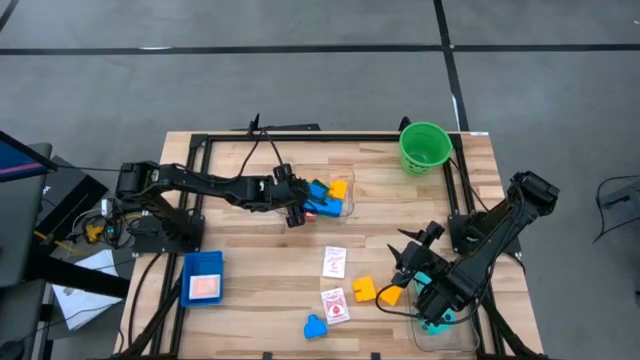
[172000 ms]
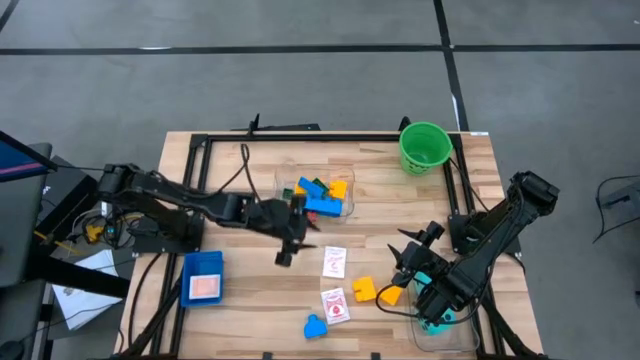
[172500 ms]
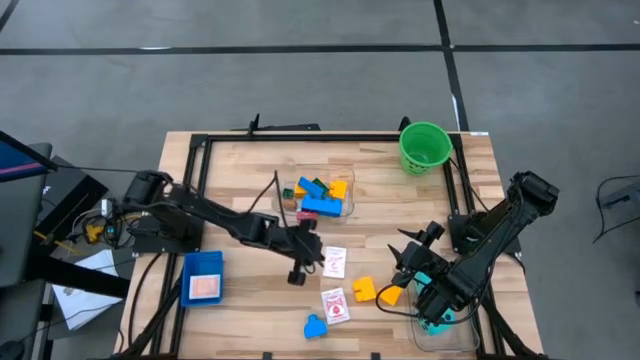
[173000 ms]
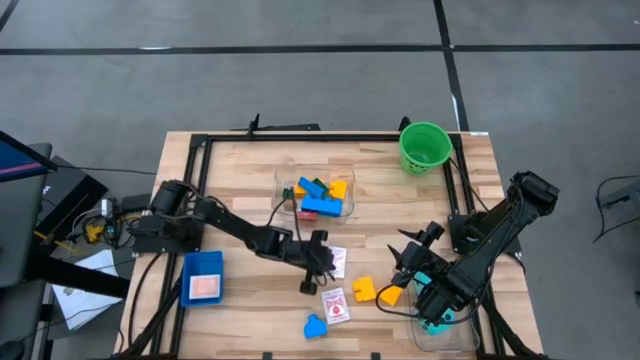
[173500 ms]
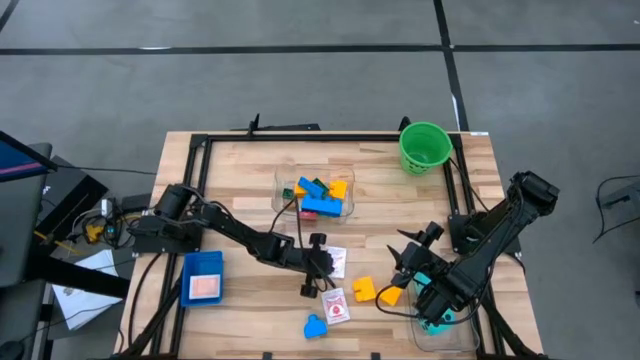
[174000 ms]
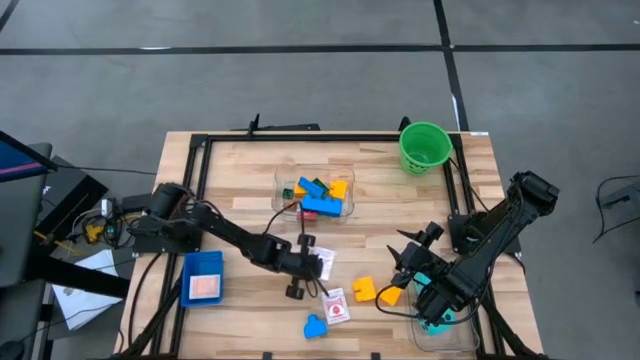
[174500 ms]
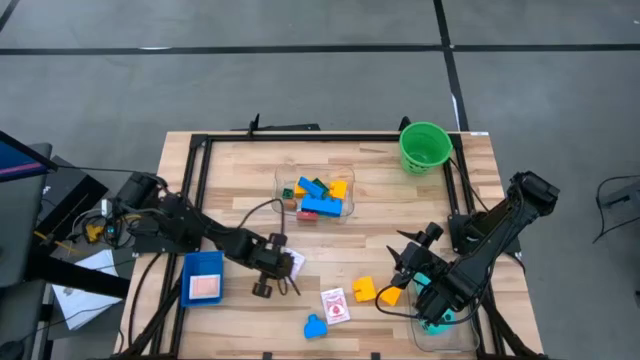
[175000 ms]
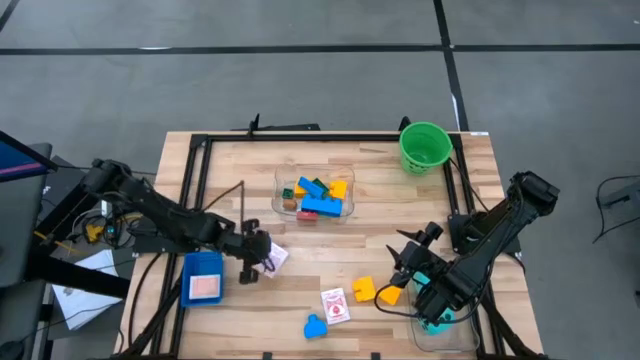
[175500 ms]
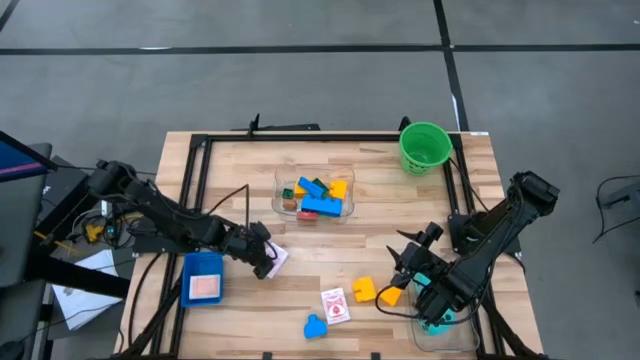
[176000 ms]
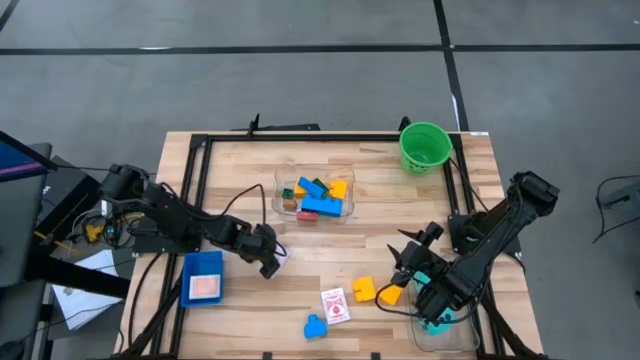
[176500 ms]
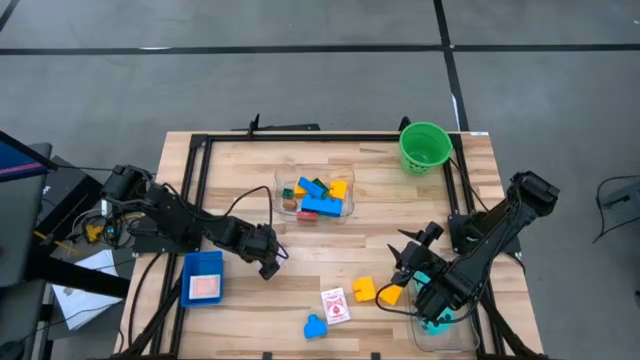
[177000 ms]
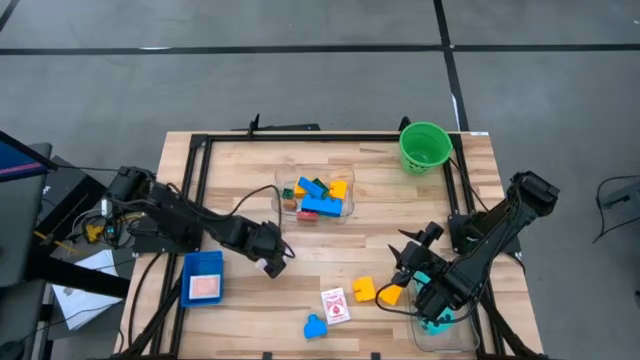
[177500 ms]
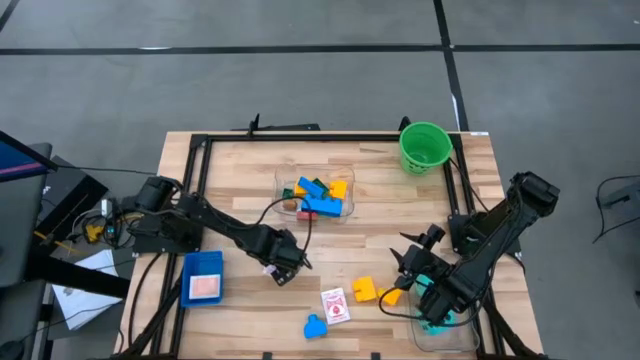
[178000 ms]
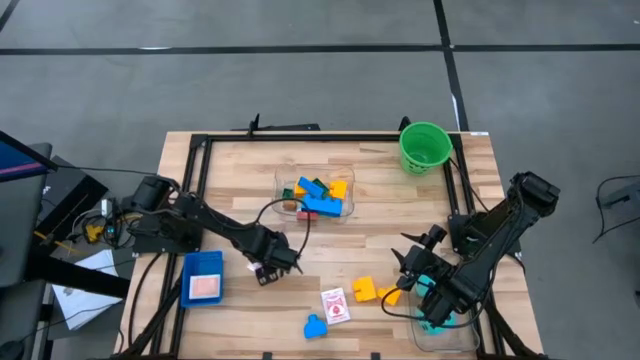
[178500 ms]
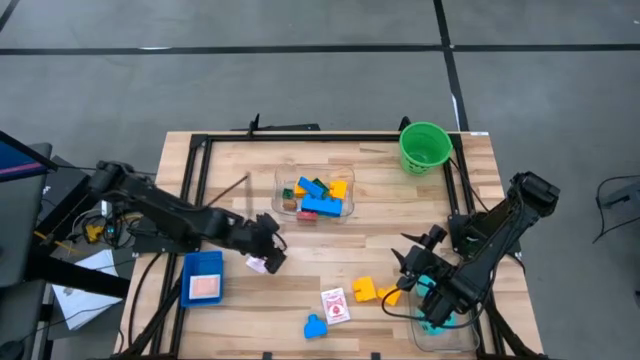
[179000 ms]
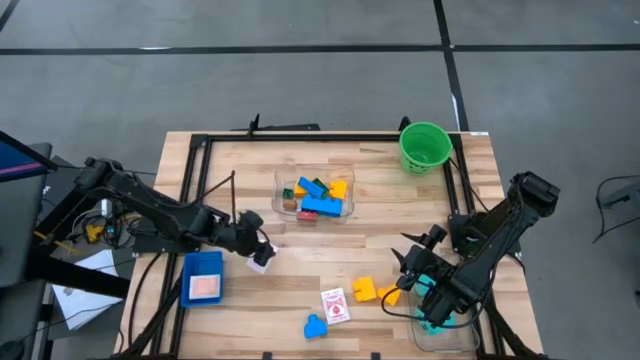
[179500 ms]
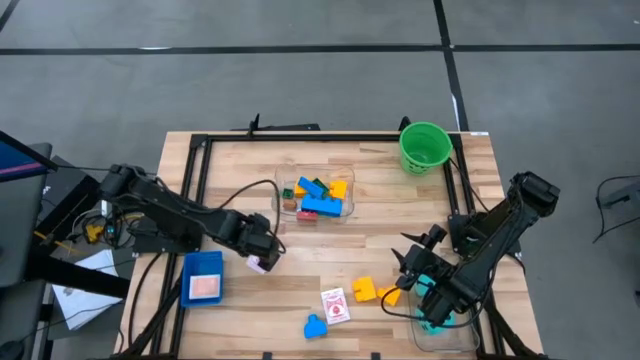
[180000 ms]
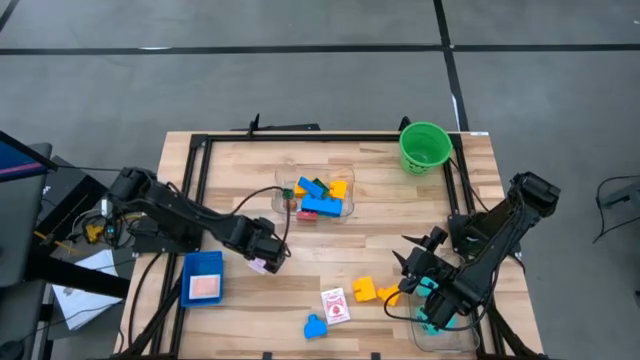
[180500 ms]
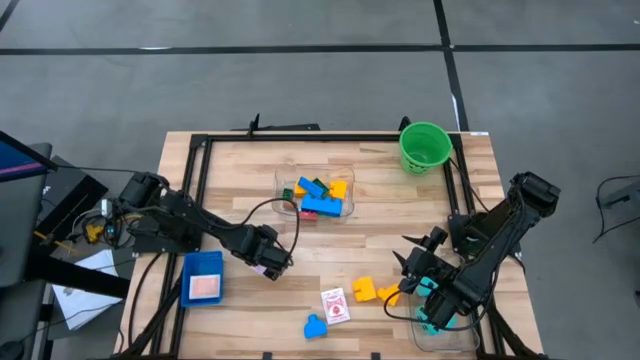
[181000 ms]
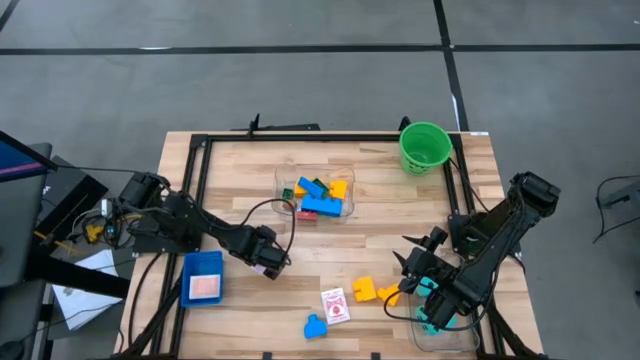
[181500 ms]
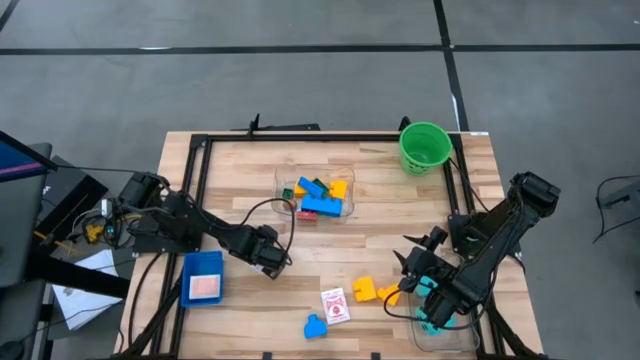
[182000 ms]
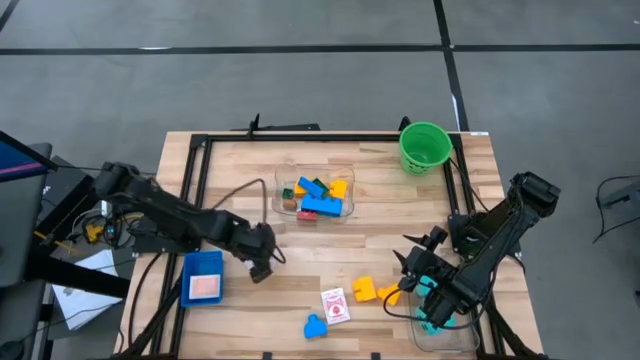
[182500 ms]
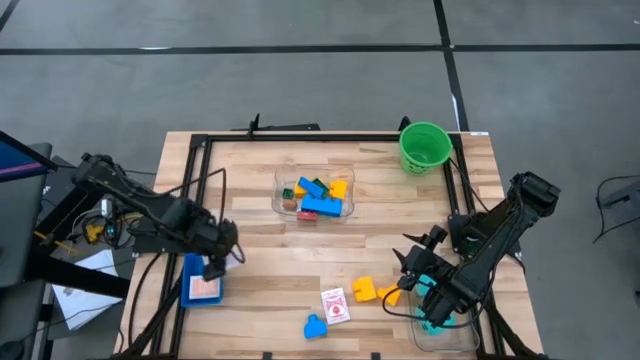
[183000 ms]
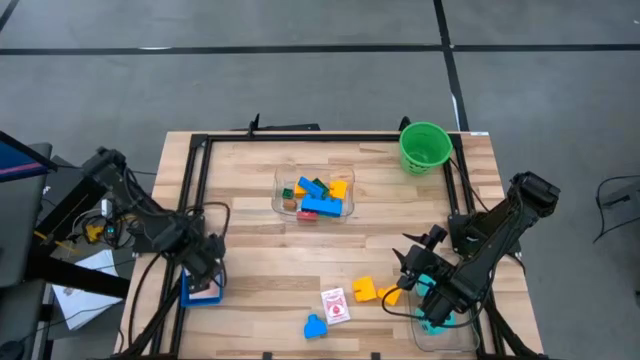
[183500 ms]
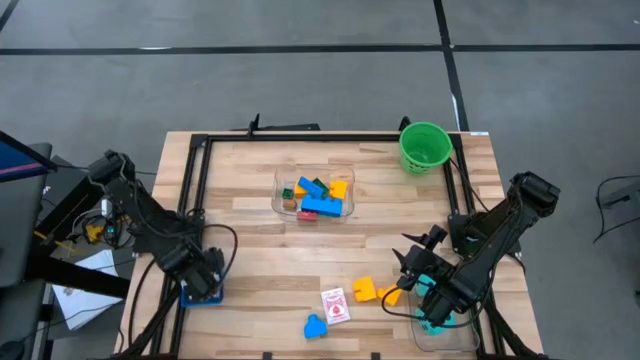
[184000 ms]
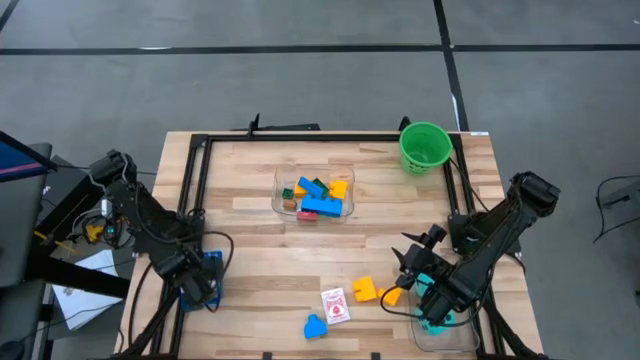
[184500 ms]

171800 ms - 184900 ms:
Task: Pick & Place Toys
Put the pink playing card box into the blue bin

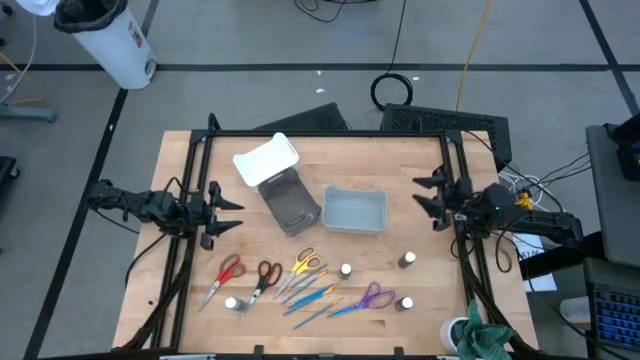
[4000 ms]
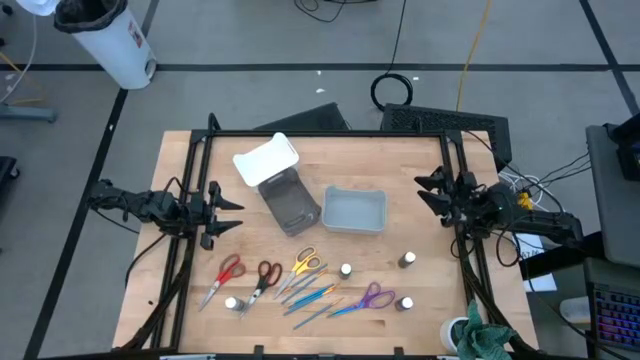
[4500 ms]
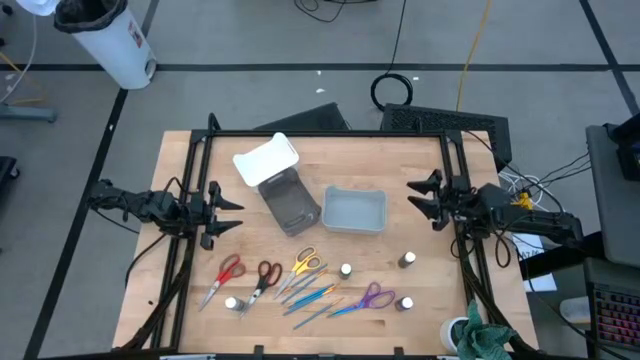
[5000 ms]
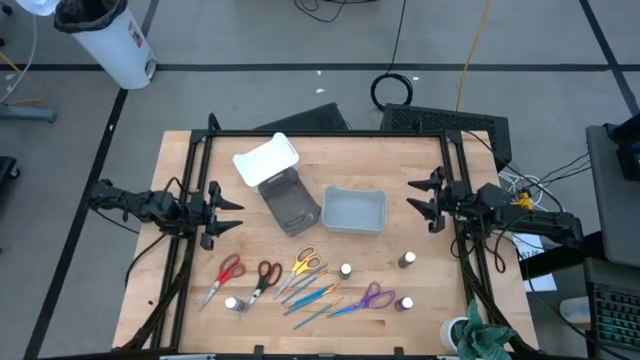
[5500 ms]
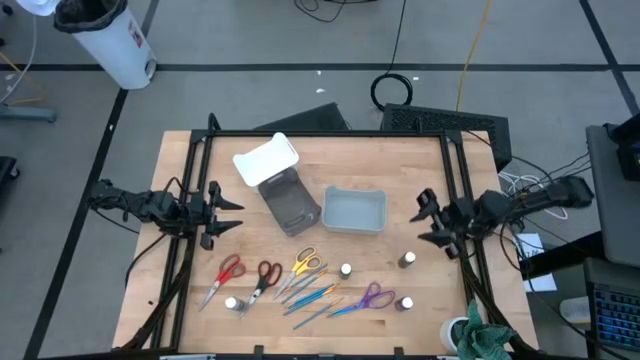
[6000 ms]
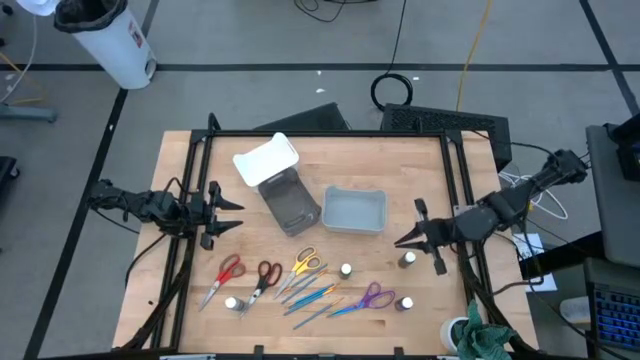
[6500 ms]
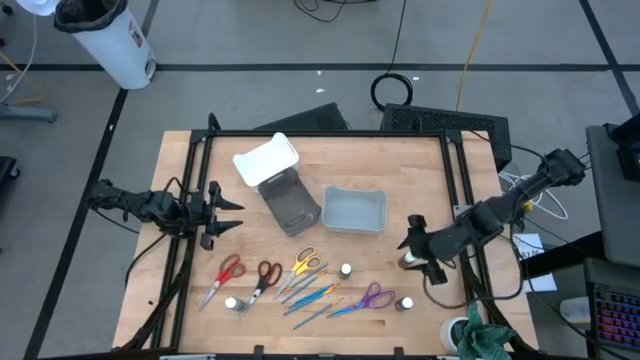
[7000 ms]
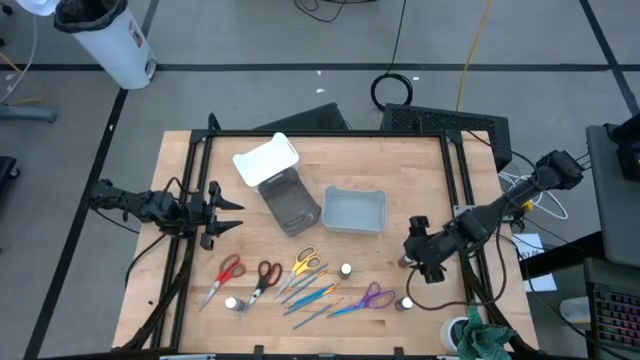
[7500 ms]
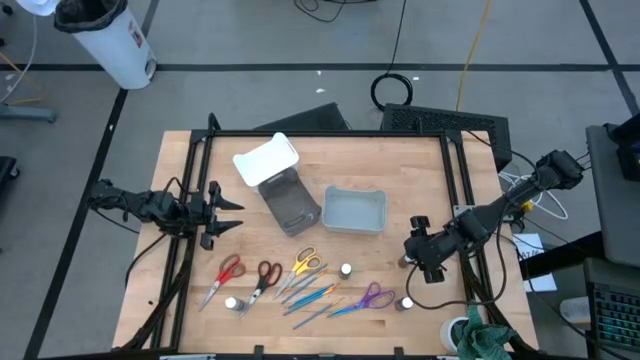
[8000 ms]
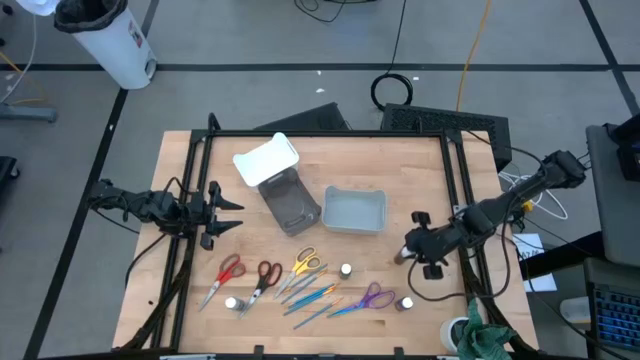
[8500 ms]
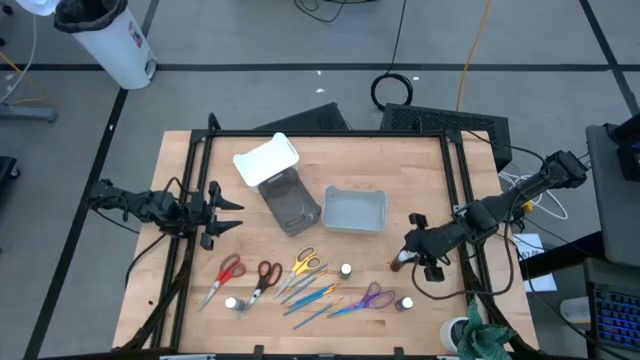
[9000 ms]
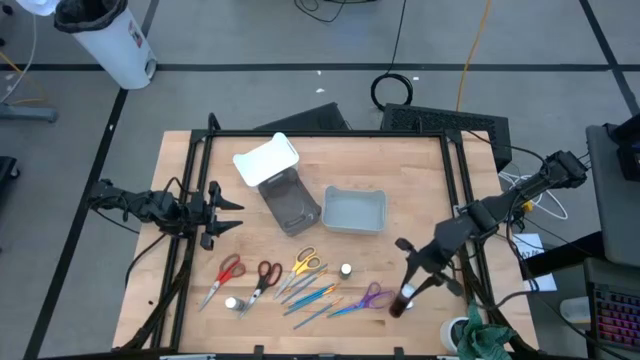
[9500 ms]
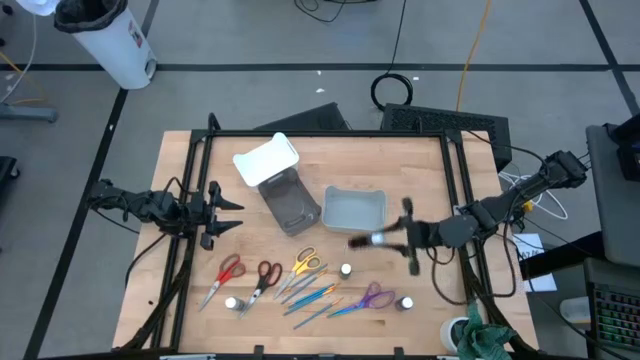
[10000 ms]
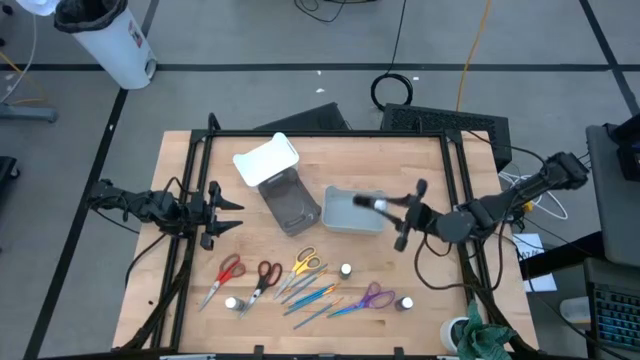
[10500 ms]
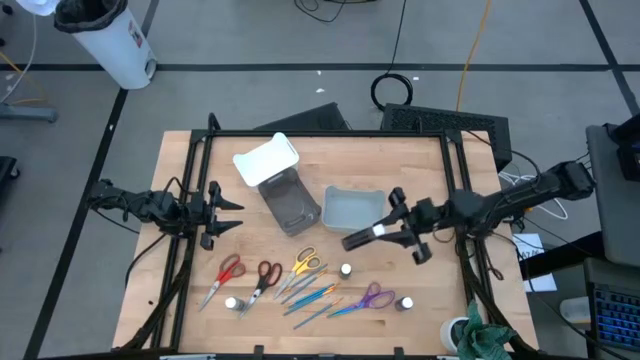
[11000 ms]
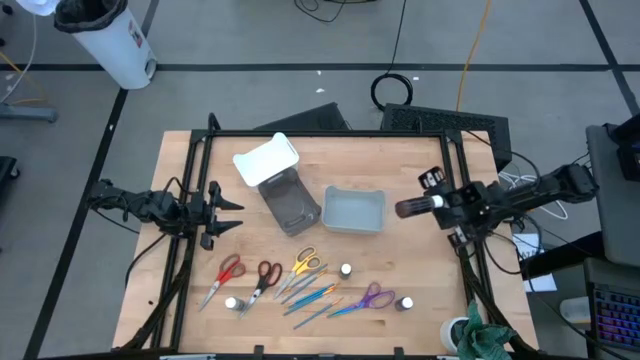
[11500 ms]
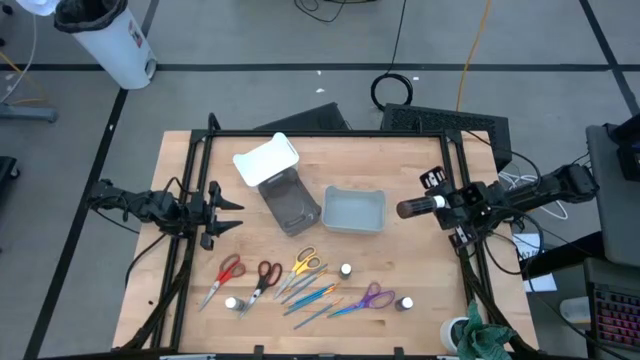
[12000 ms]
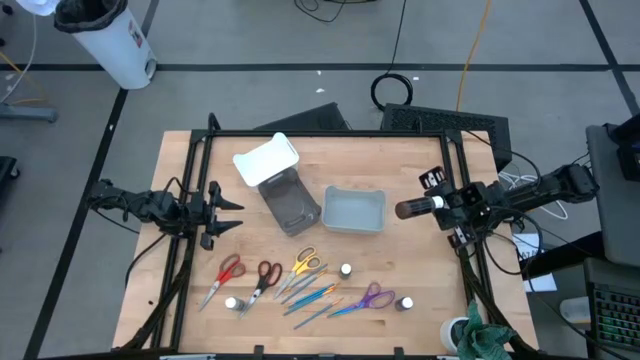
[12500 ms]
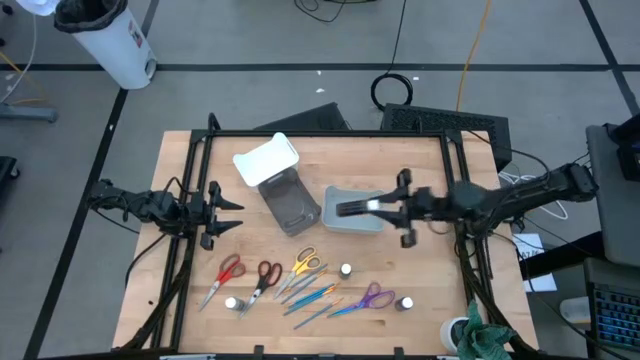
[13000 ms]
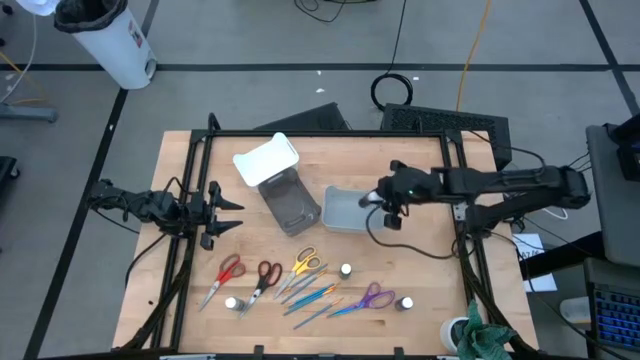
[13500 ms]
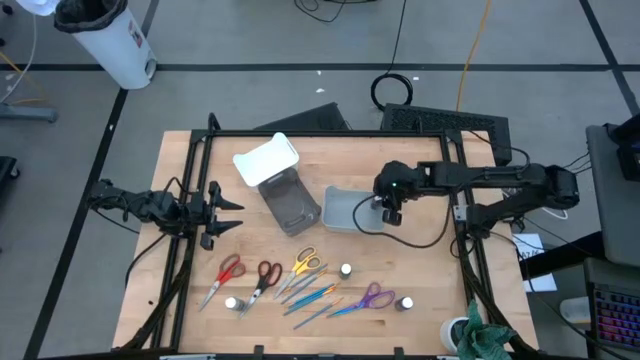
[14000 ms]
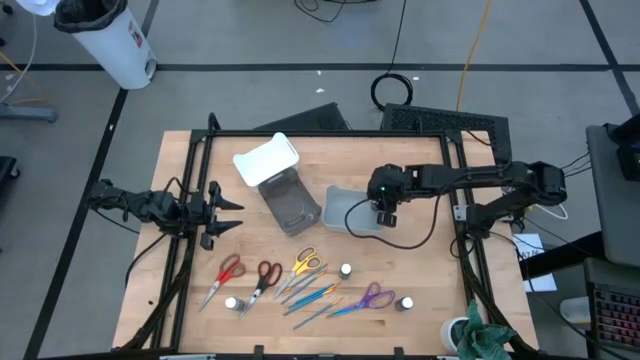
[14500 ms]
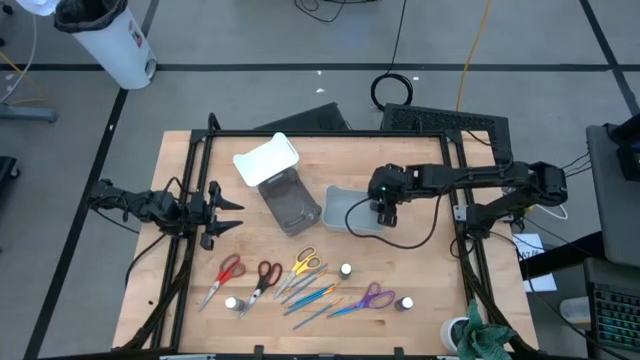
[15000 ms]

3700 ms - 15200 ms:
Task: Pick & Place Paint Supplies
Put the brown paint bottle into the gray bin
